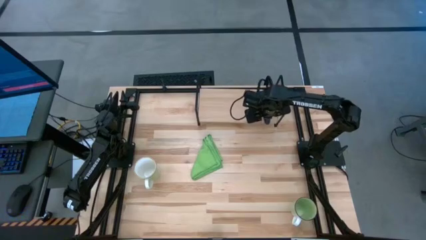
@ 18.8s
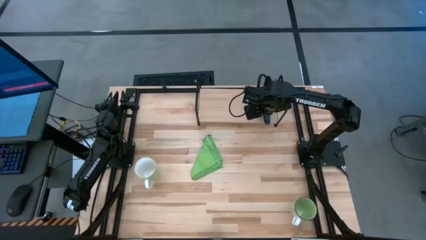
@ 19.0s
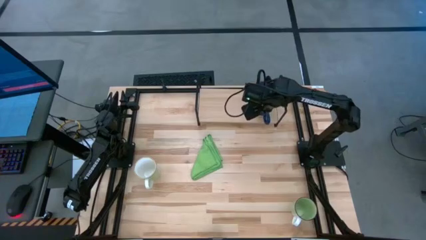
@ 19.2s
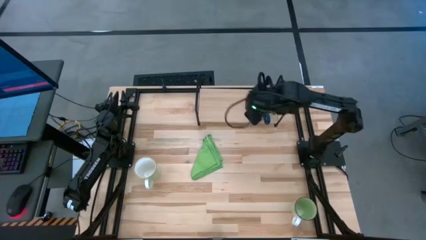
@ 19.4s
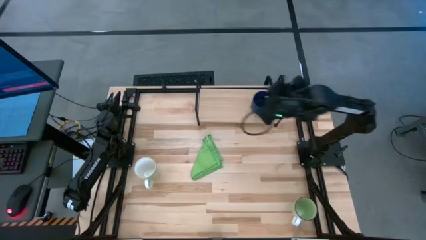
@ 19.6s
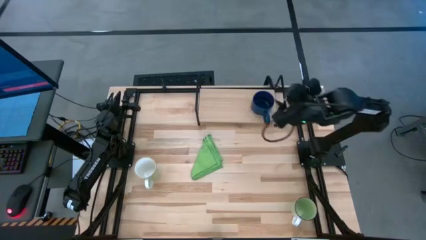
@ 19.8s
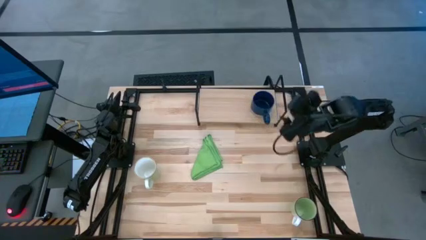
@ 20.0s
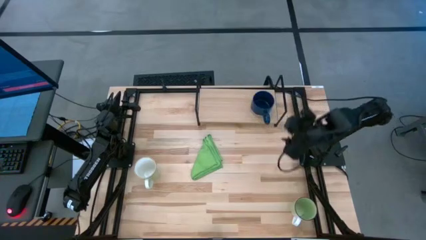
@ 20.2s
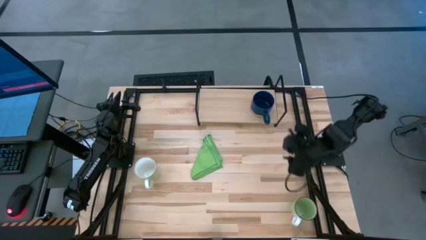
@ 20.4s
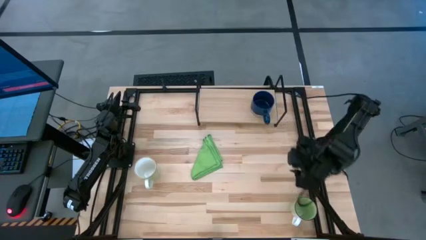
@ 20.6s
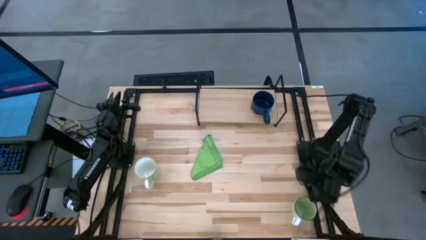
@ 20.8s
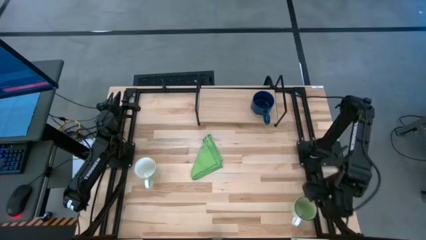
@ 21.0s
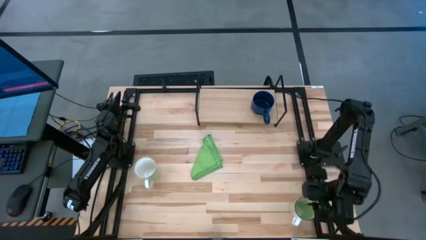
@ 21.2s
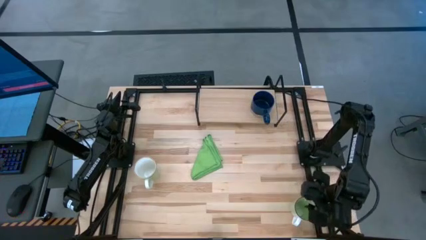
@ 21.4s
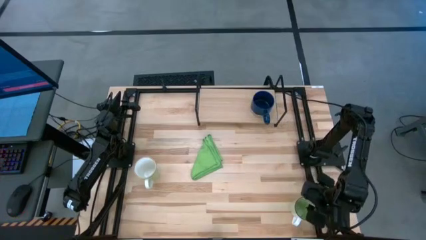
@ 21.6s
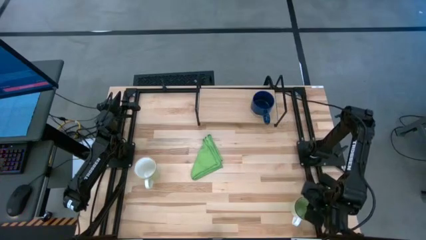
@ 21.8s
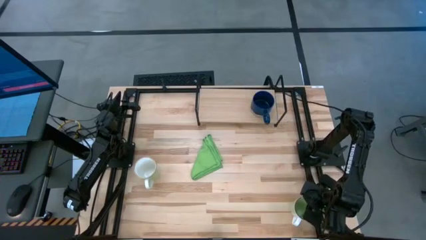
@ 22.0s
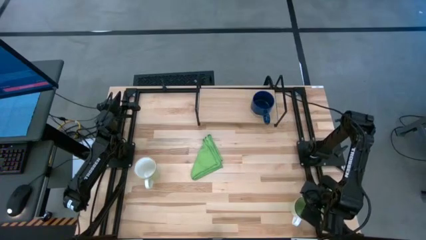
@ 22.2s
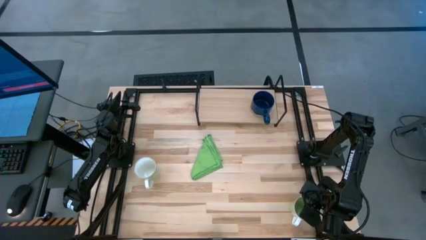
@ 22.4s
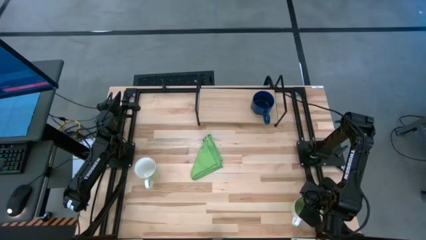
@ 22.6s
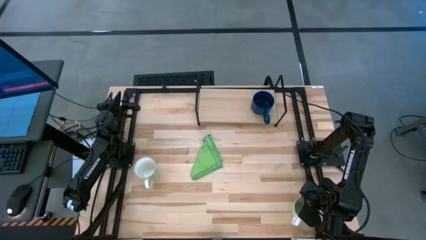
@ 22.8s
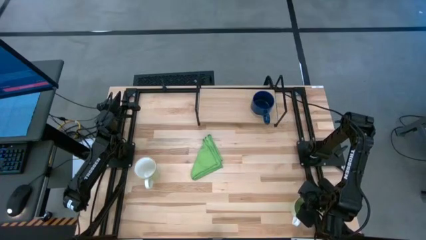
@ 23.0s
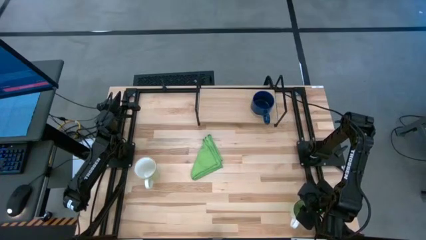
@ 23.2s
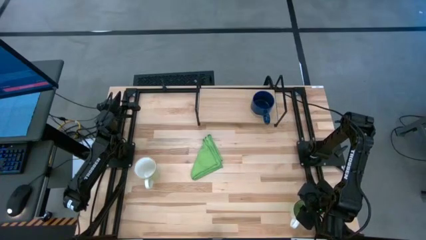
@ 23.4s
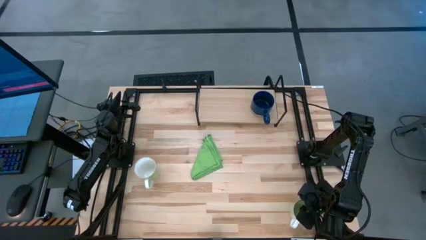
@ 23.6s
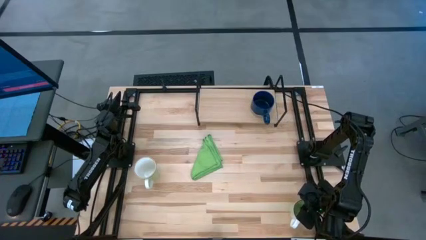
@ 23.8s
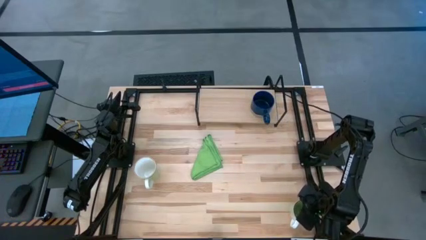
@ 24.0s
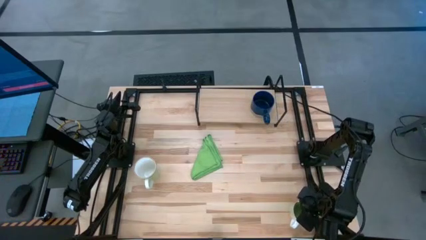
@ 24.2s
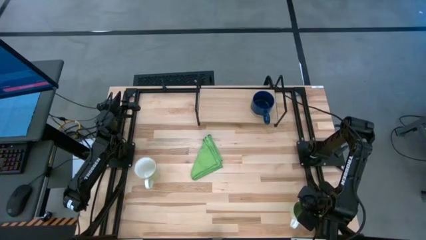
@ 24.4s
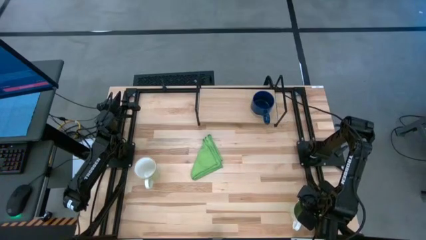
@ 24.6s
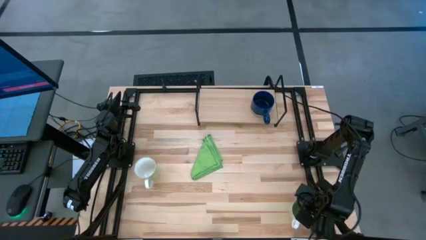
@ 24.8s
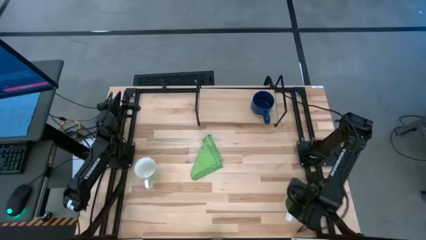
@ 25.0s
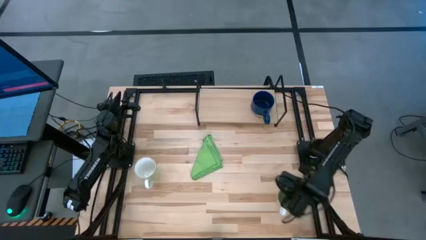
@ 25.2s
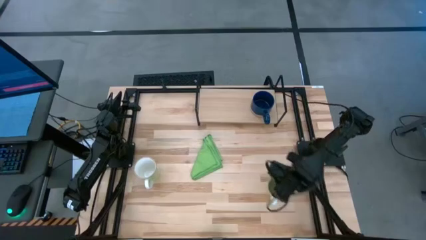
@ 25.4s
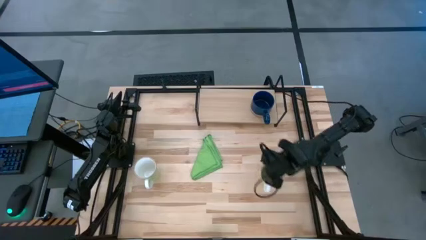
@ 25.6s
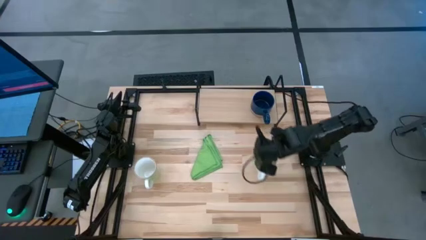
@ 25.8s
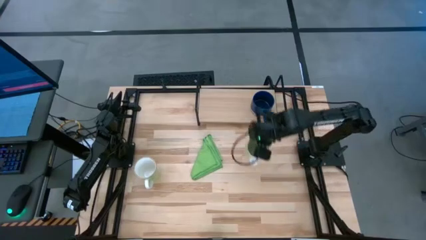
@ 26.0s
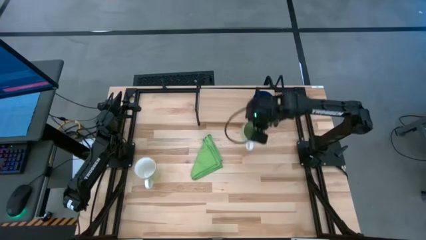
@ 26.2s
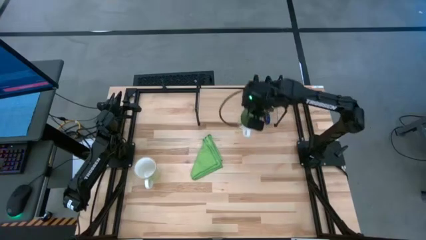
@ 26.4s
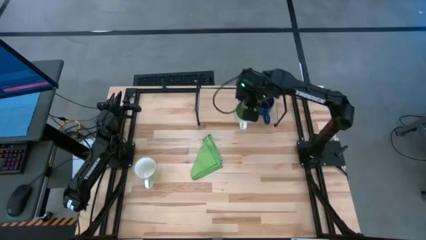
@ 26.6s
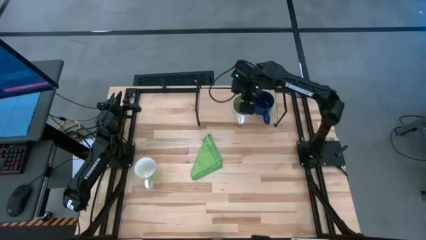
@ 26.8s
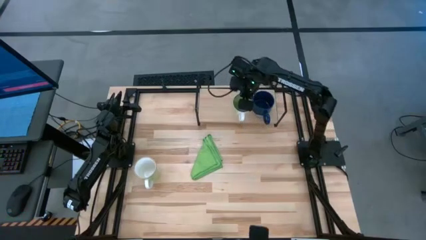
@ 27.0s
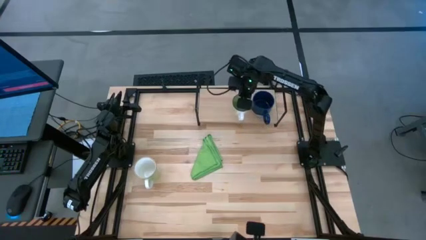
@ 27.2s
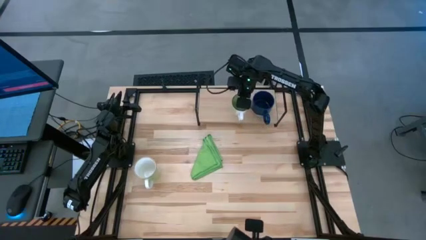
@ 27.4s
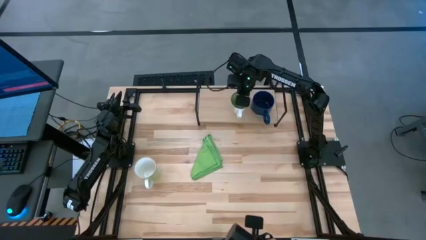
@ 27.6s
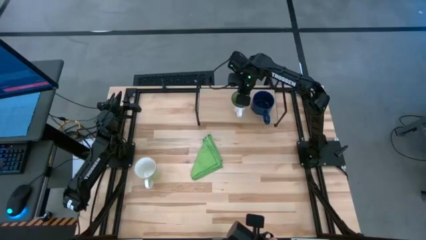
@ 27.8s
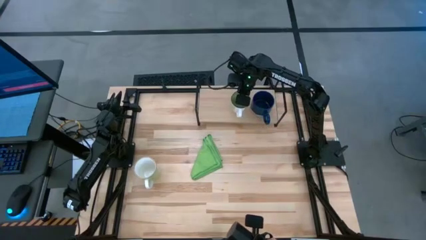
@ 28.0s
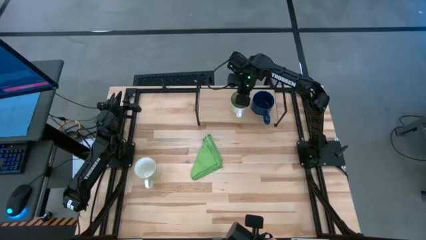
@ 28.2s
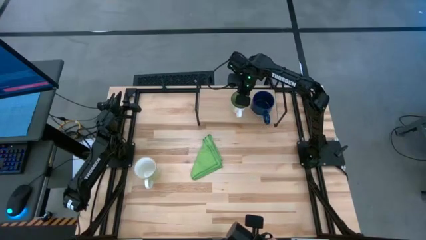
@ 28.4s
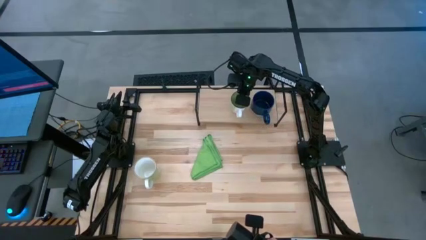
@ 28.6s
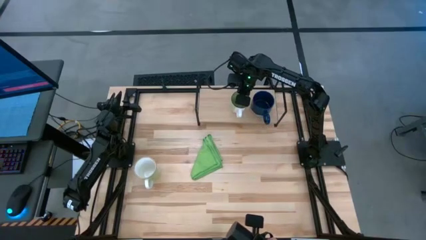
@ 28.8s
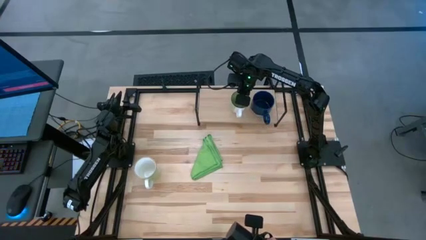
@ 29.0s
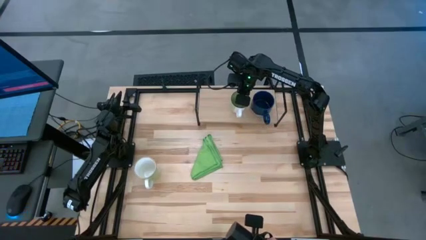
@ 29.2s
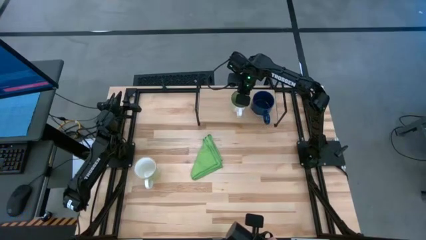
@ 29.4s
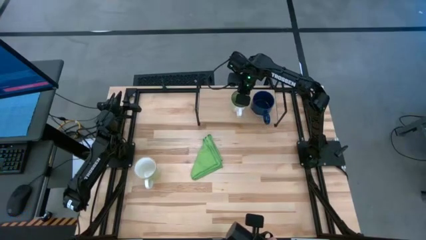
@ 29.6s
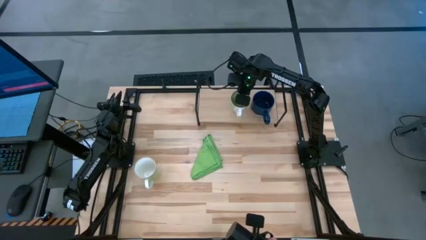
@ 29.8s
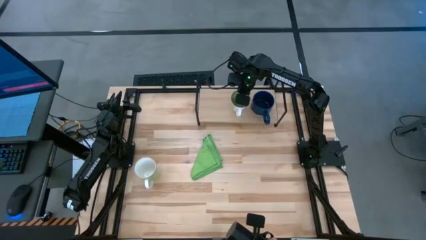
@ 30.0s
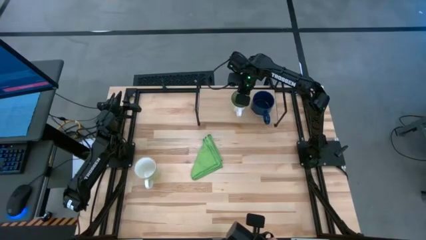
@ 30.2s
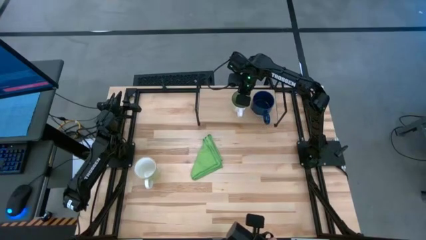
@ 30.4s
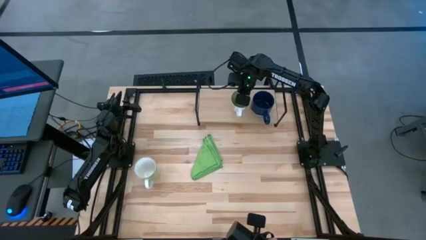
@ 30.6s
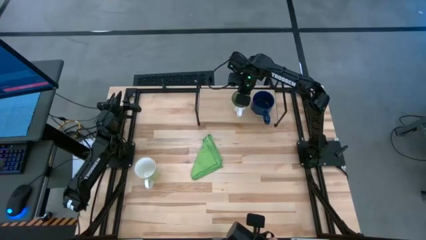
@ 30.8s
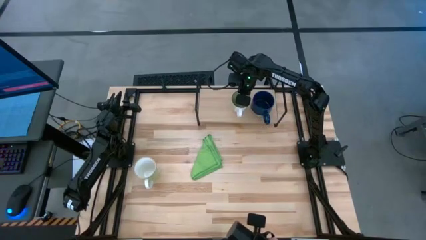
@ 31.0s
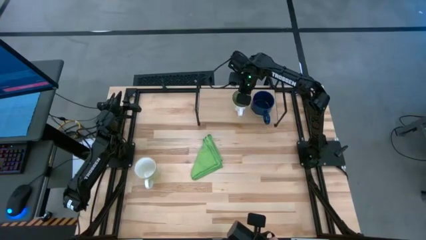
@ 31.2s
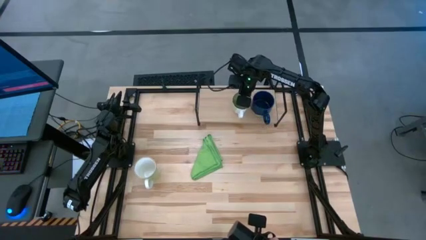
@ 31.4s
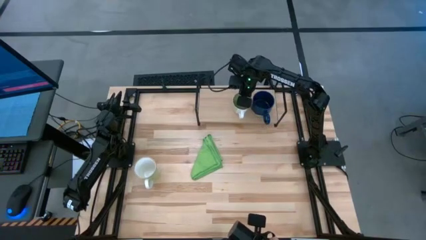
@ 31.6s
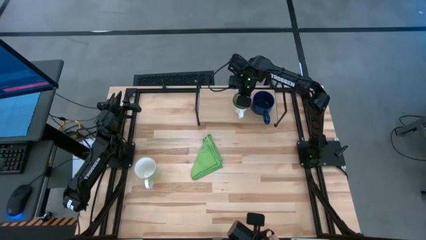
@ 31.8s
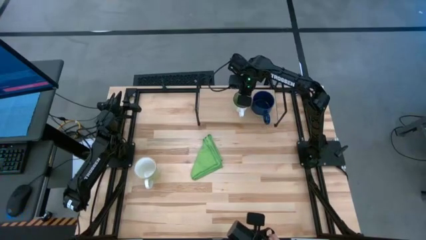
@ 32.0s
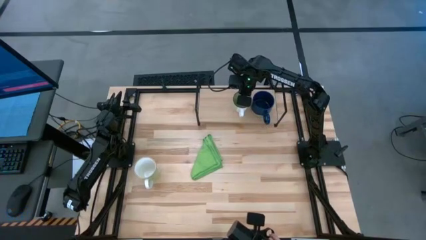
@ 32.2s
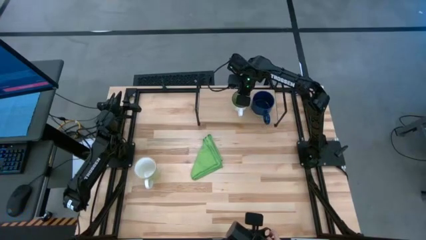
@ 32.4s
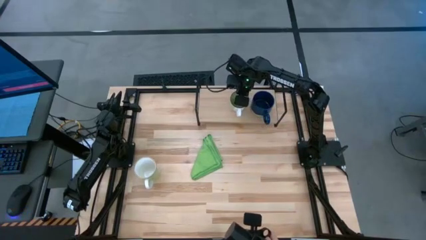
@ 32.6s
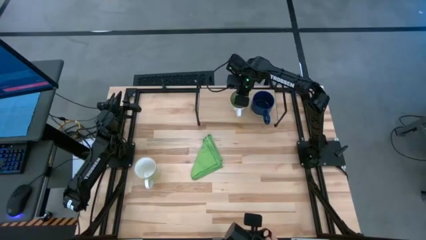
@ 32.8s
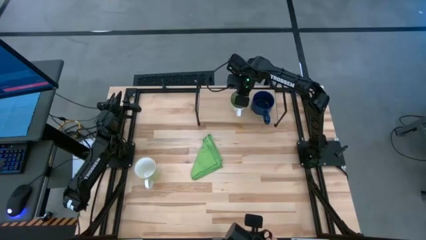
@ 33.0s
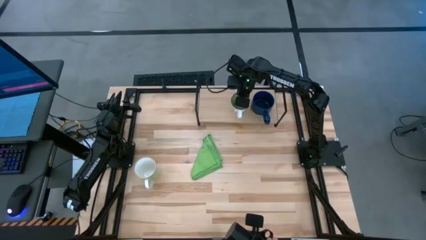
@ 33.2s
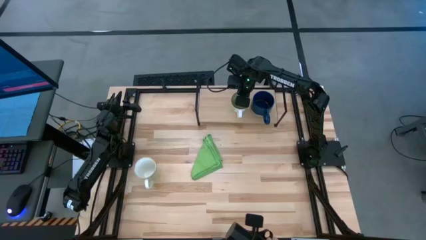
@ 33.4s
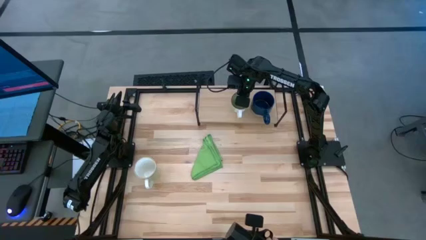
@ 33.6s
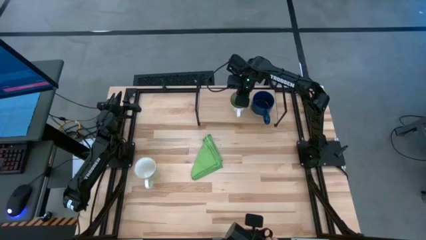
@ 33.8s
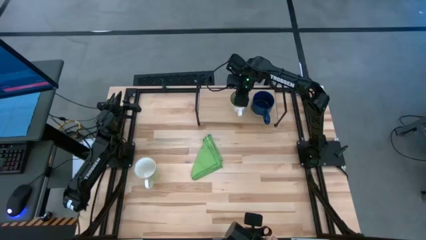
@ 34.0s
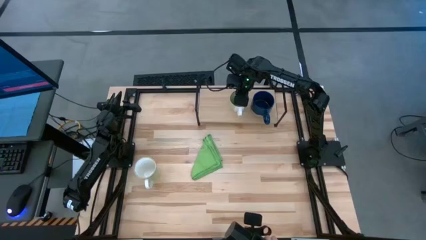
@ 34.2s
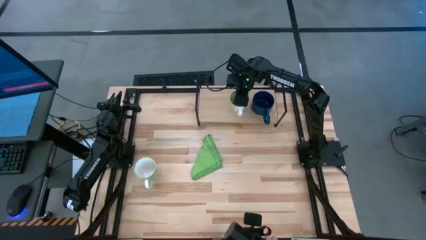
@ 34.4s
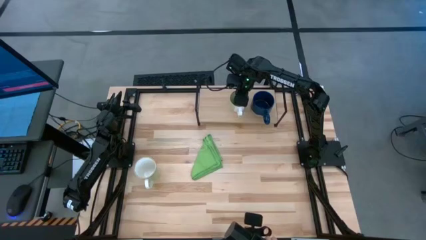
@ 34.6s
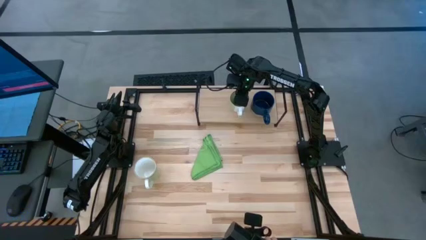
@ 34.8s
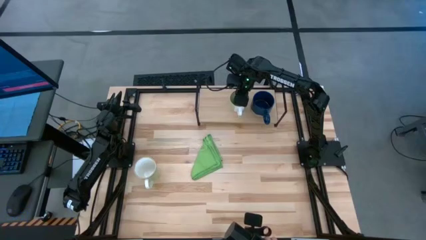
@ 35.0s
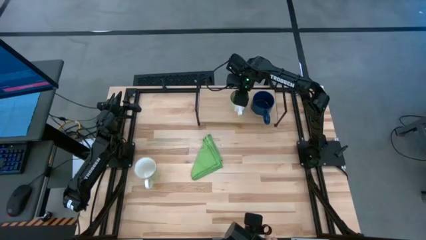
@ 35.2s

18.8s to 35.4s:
Task: Stack small to large cups/mugs on shelf
Put the green mug on the shelf
